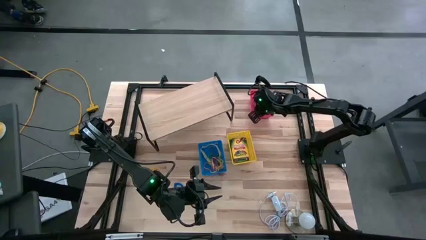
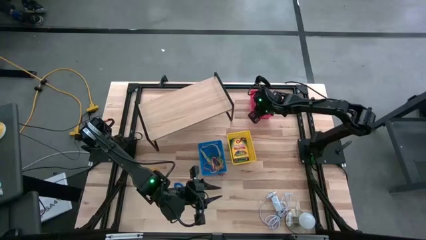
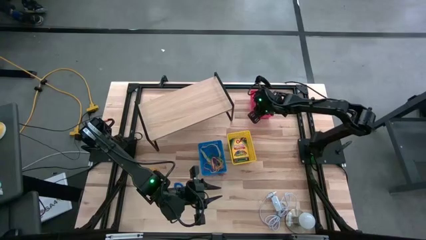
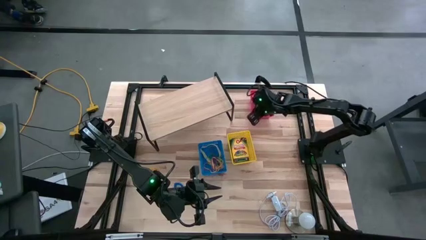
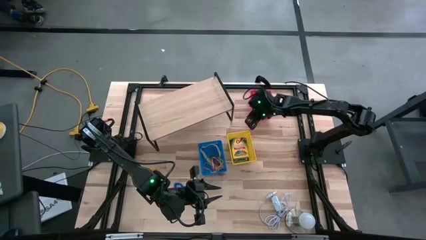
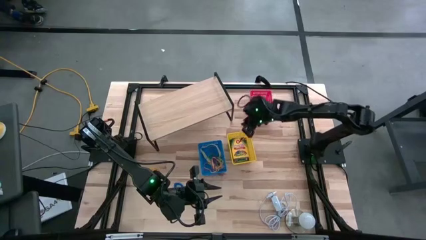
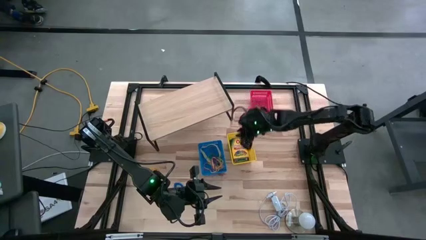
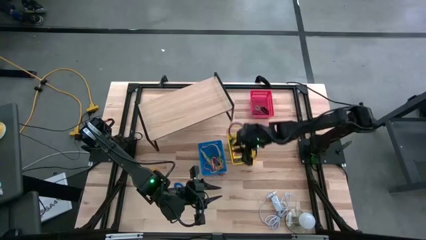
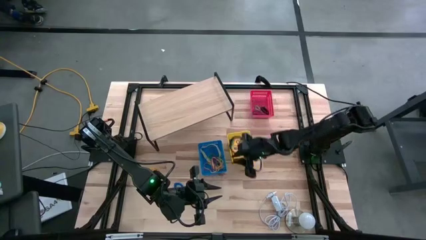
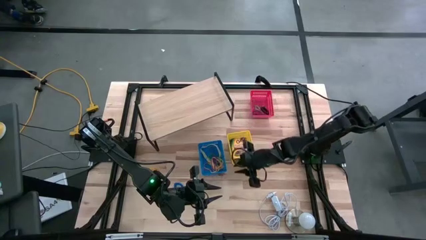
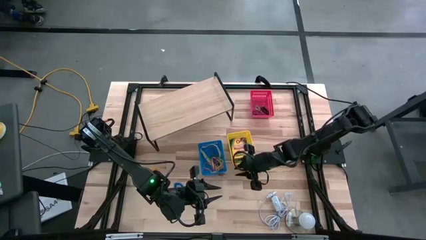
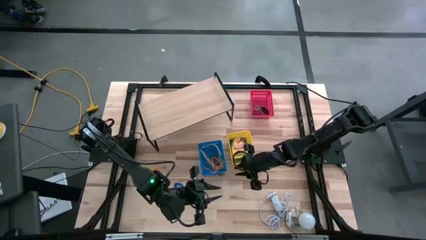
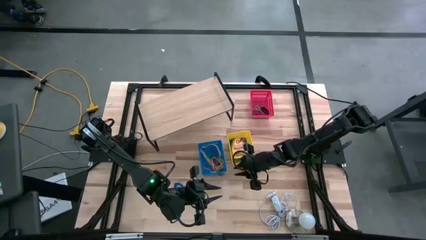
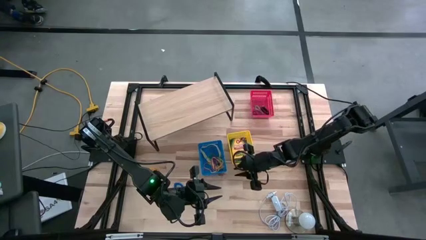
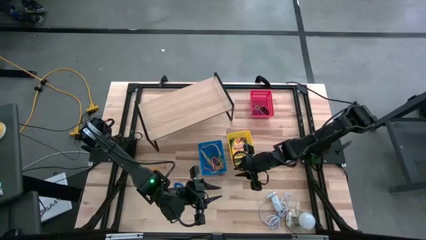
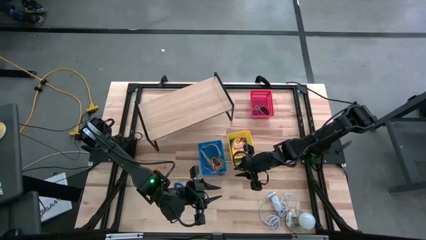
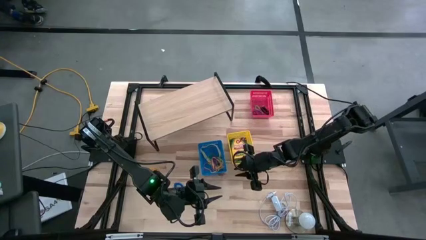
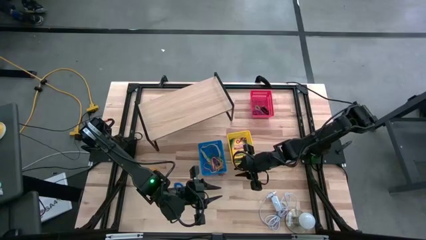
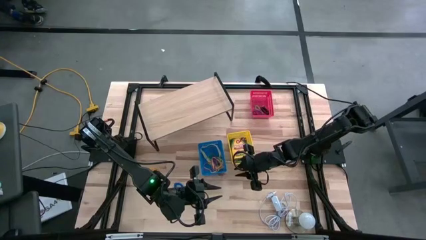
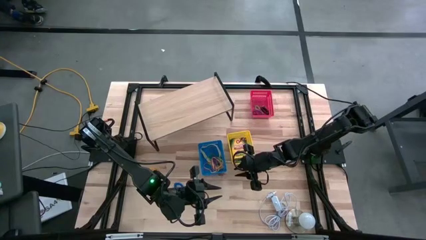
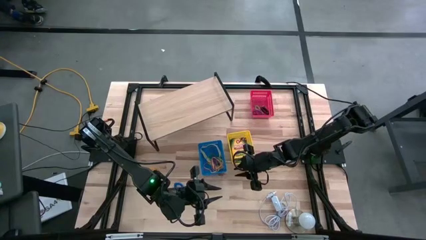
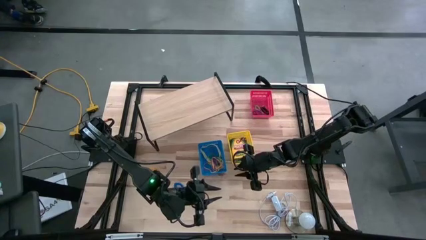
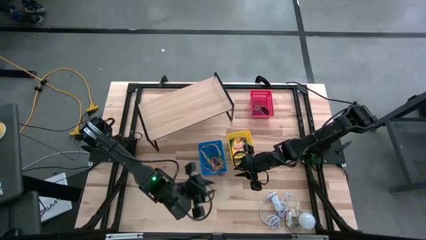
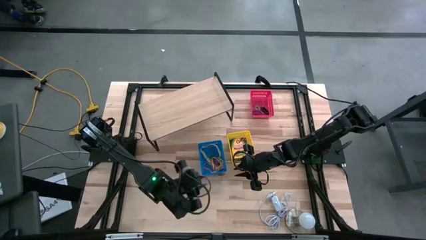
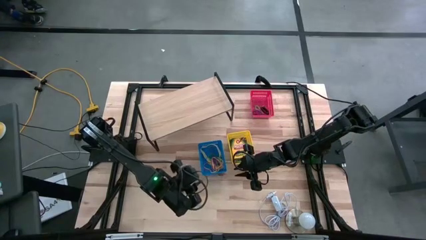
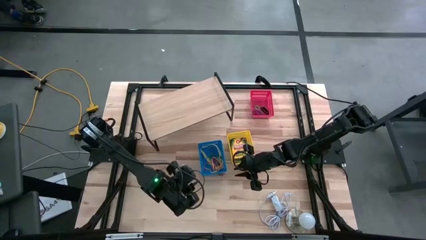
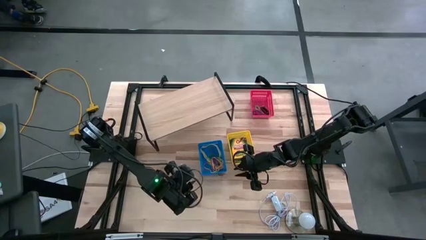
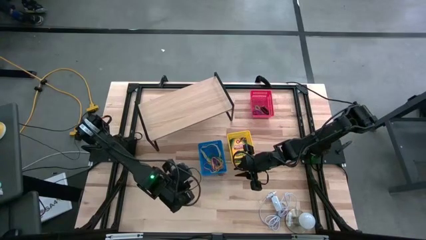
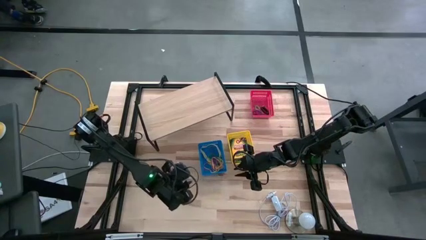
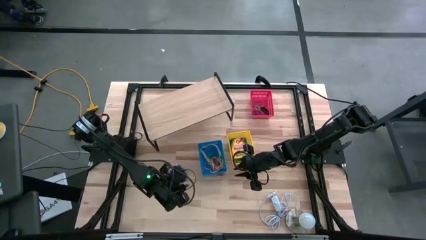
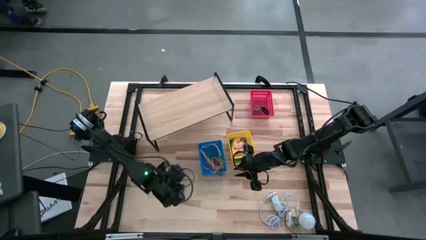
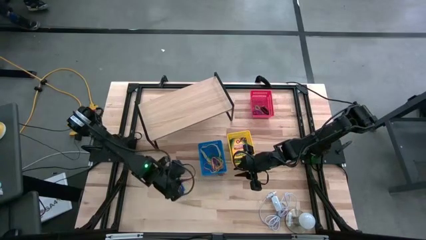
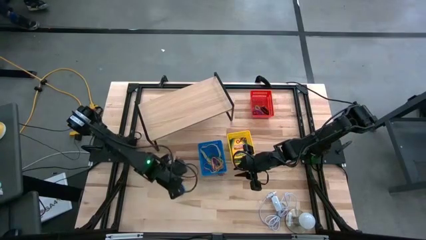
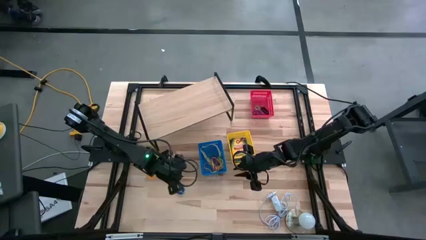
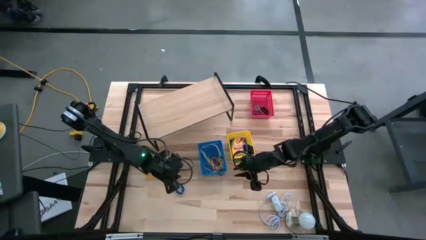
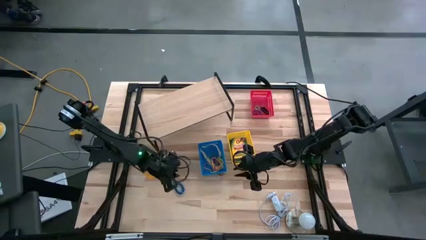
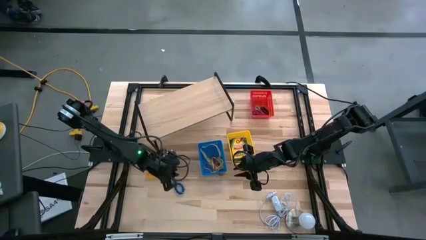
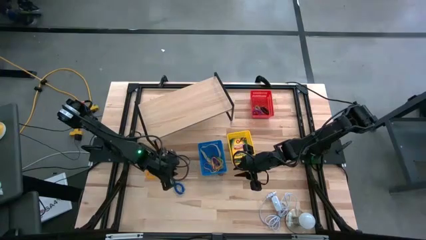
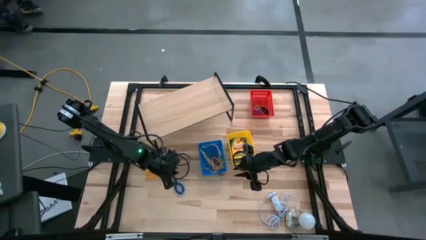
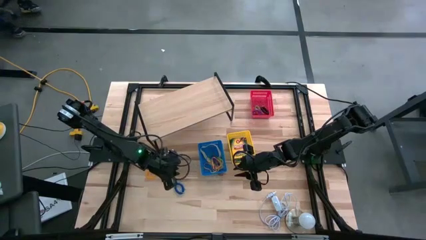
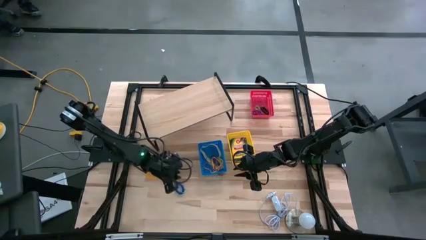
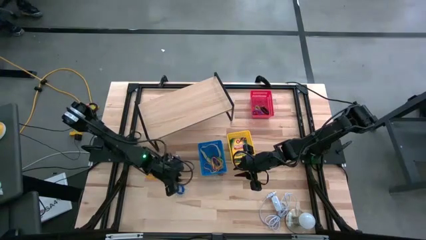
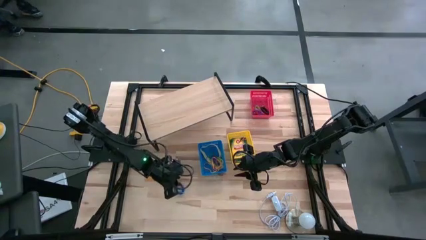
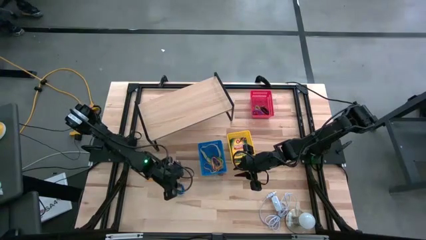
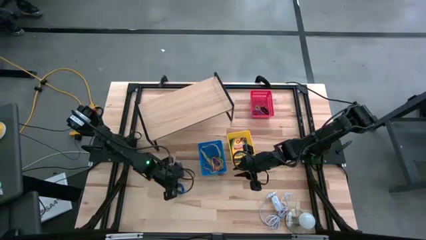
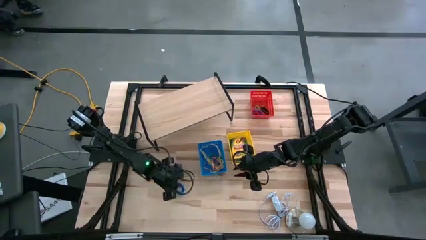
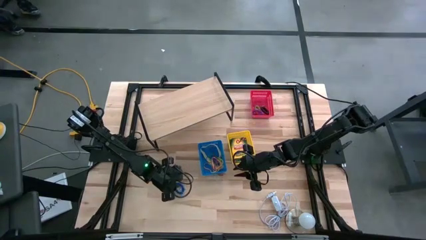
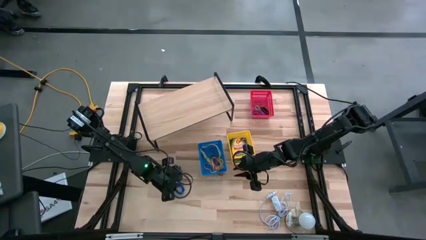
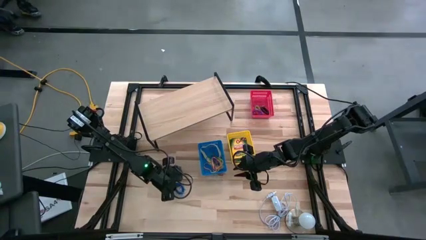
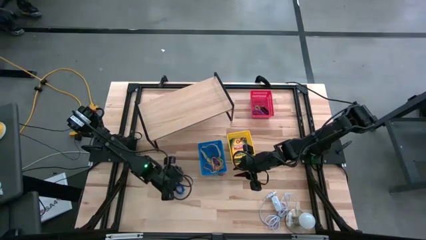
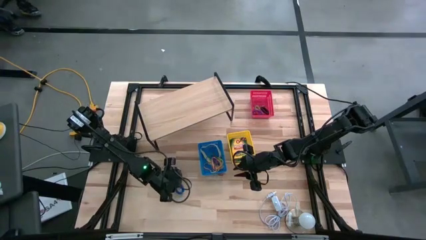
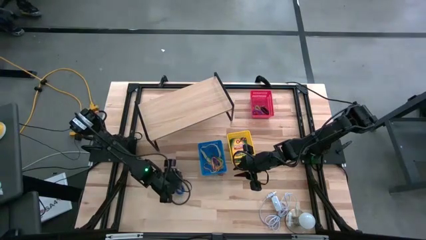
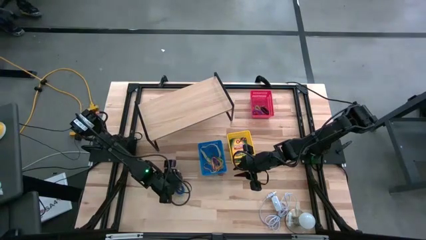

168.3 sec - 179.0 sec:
Task: Pick & Place Office Desk Supplies
Put the blue spring keychain into the red bin
